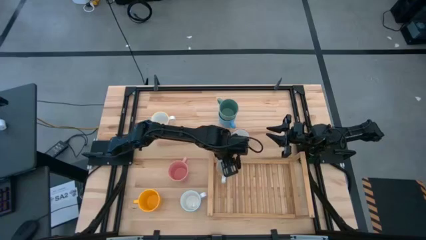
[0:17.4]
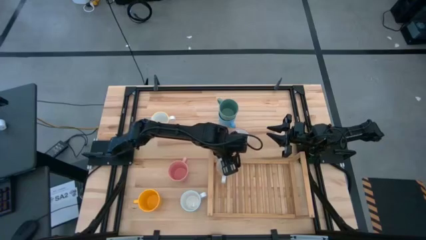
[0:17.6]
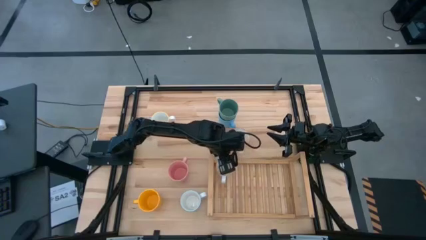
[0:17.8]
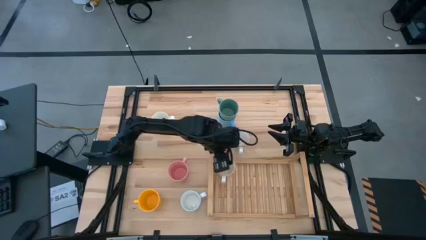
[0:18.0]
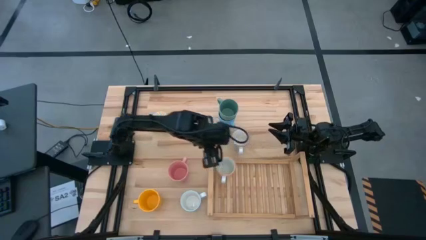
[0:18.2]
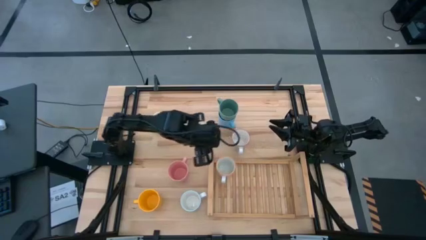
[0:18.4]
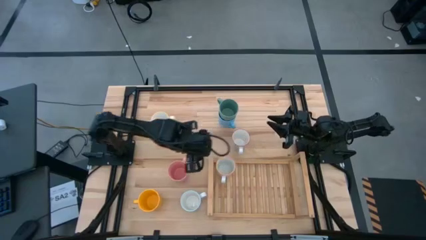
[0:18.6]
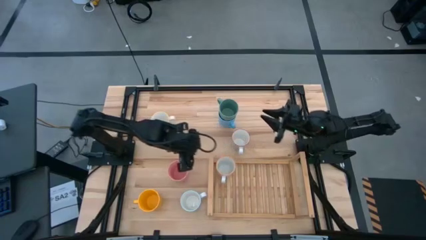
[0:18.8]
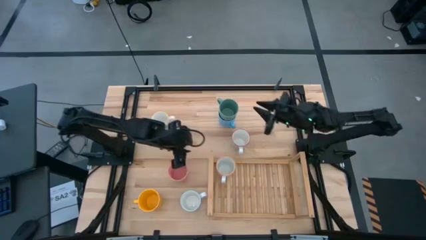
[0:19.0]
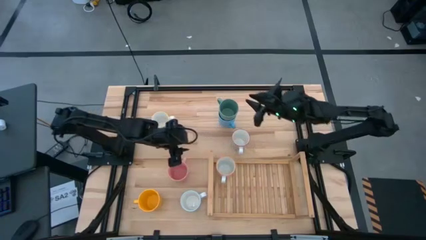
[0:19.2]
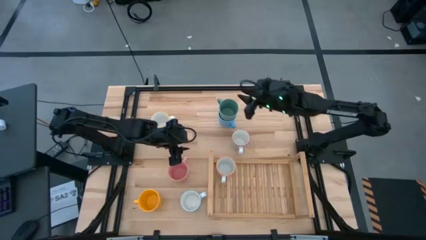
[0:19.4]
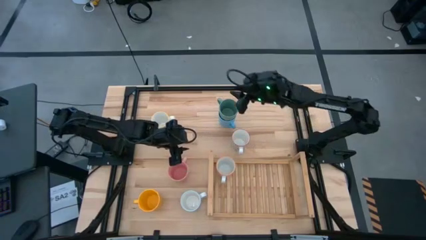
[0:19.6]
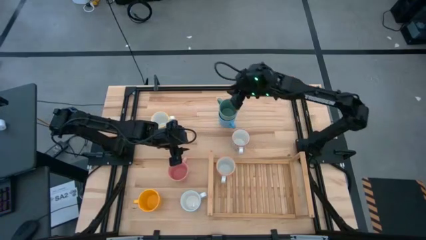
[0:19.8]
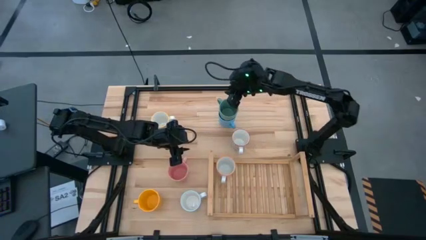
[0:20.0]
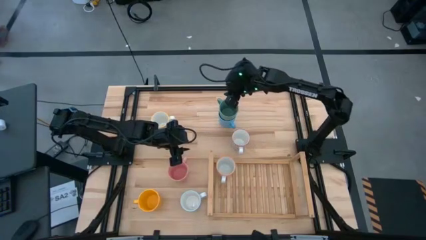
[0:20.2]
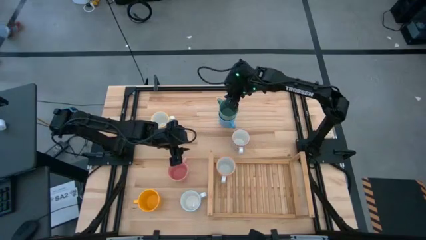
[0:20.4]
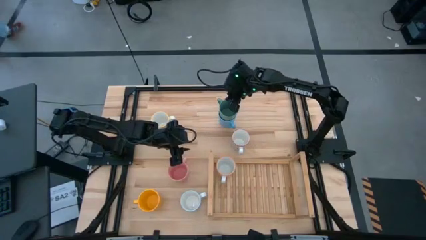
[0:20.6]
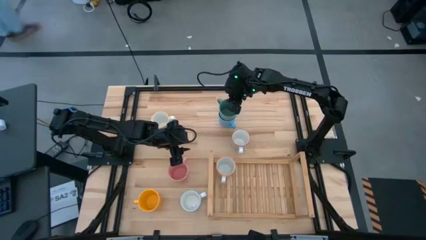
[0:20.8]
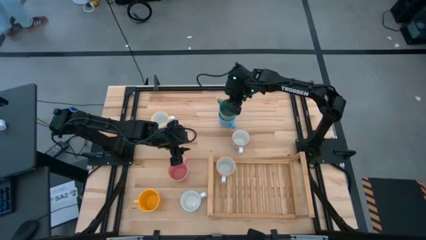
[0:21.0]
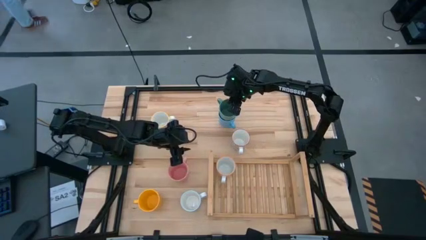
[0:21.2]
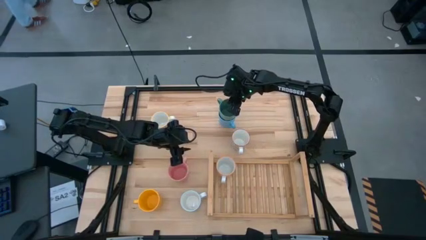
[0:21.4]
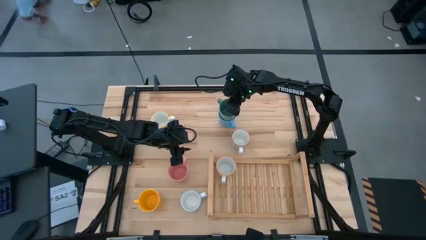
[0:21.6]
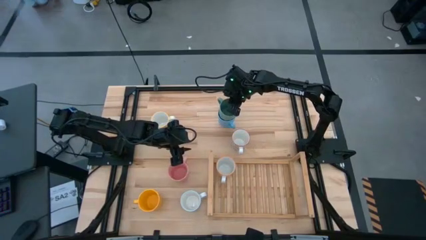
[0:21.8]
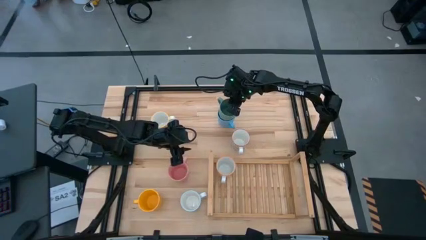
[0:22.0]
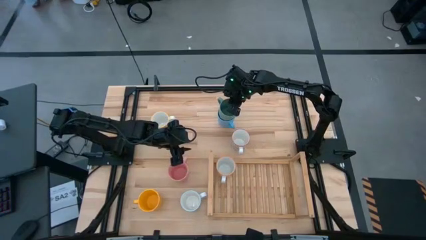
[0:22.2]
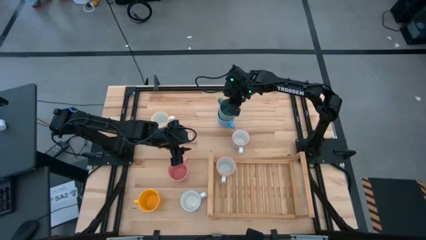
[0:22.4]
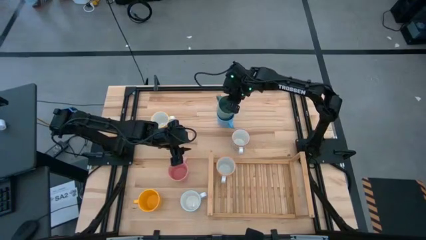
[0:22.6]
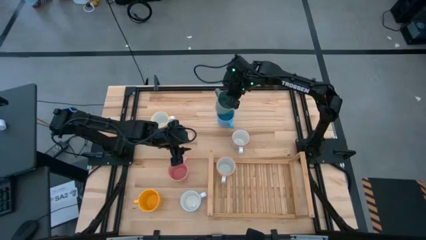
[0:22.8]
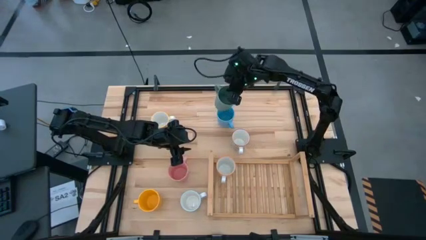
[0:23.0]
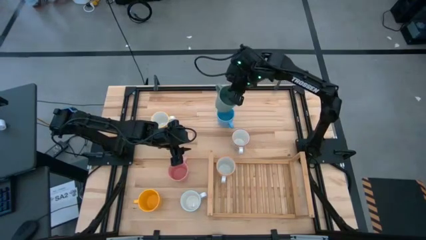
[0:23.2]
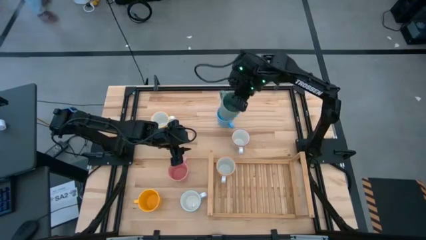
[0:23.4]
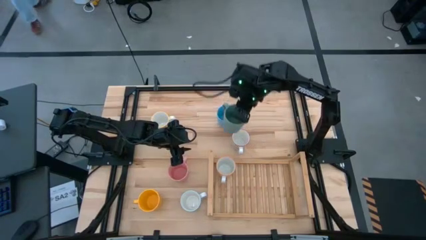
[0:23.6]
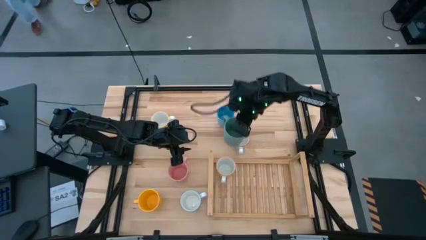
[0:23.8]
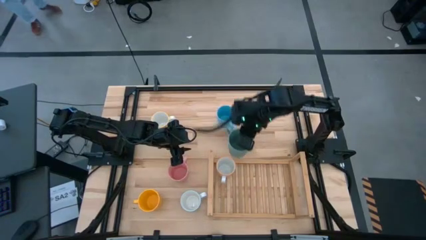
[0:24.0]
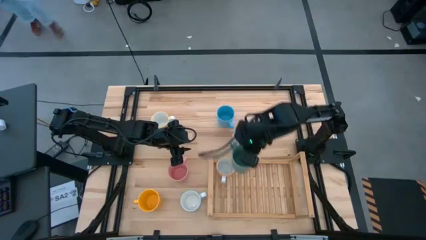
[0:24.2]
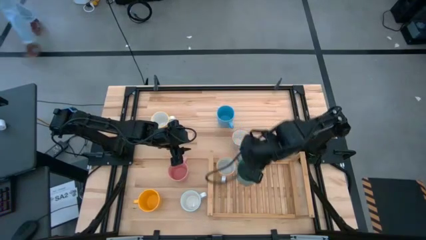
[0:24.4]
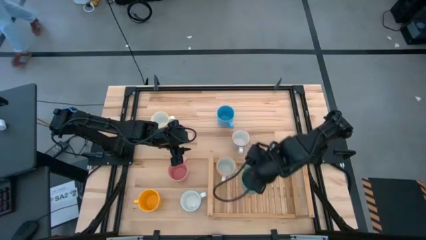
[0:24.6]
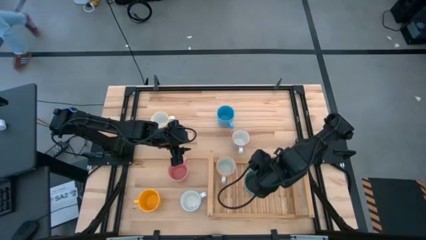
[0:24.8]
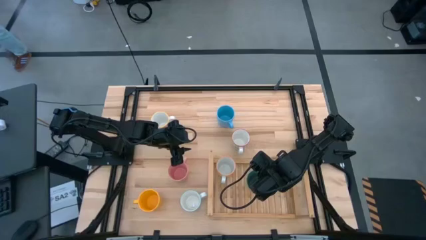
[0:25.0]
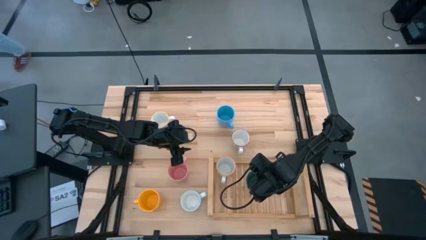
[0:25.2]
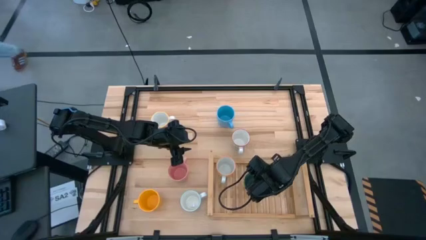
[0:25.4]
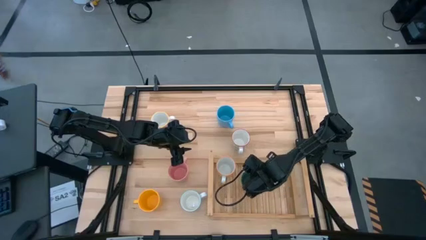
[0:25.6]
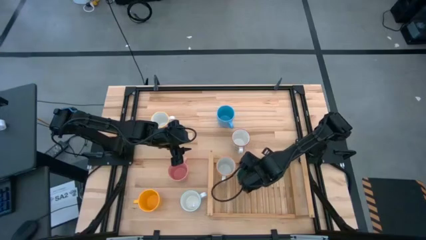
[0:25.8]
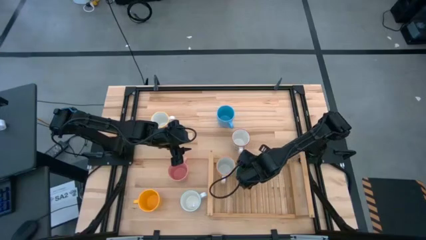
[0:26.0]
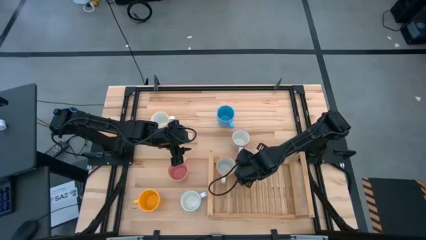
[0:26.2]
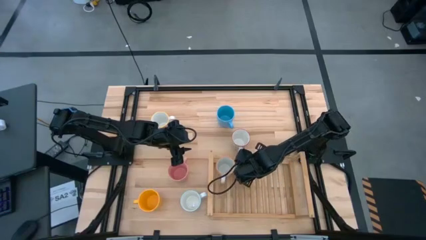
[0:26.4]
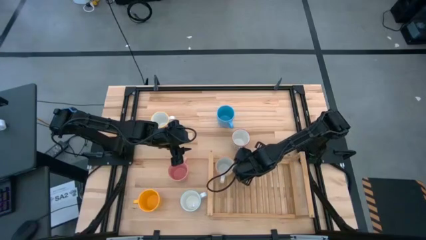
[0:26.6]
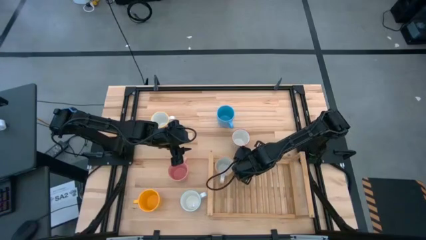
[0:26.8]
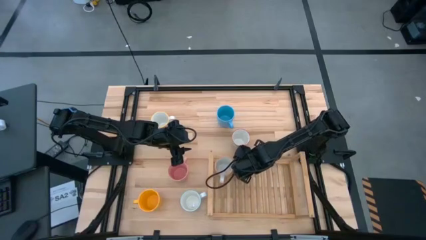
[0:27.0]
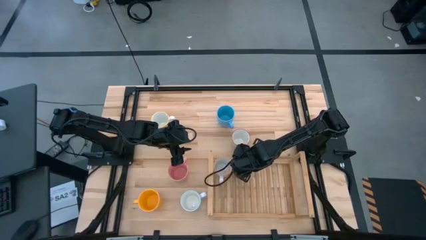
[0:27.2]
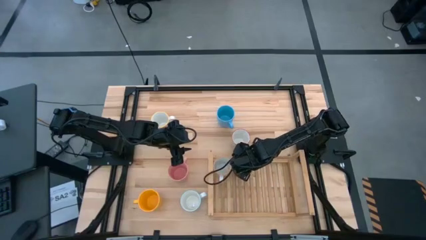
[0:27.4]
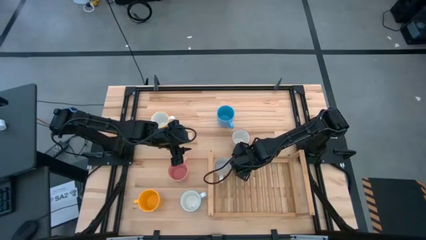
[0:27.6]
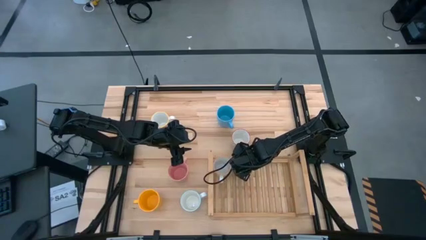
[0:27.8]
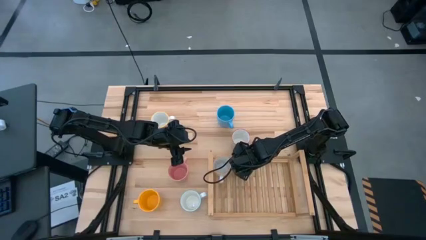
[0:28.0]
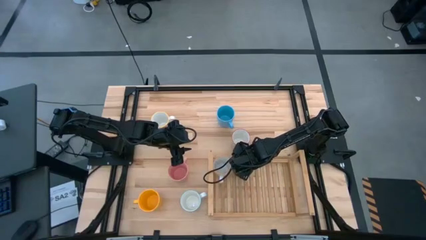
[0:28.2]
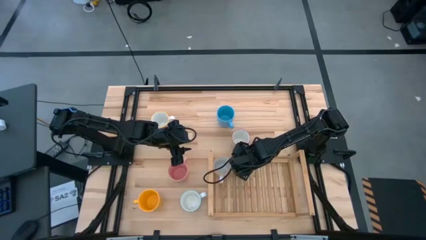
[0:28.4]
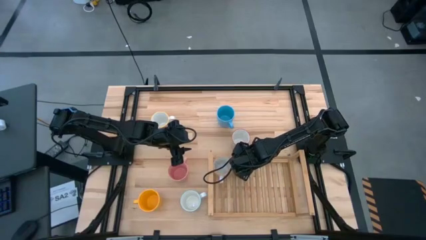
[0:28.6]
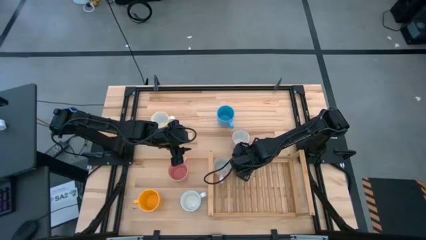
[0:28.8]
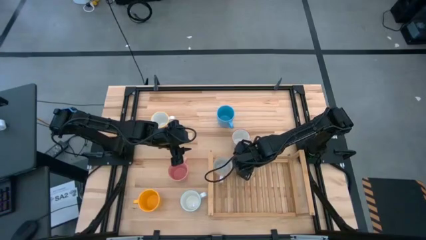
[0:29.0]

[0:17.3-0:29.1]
Task: Place coffee mugs
Put the green mug on the shelf

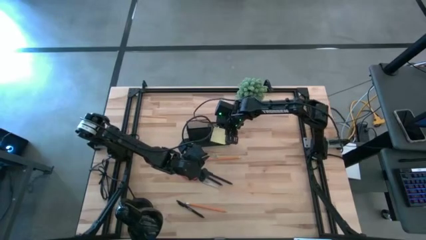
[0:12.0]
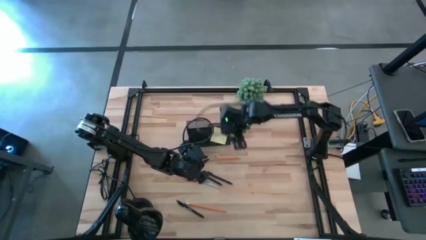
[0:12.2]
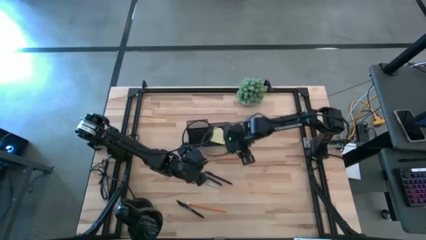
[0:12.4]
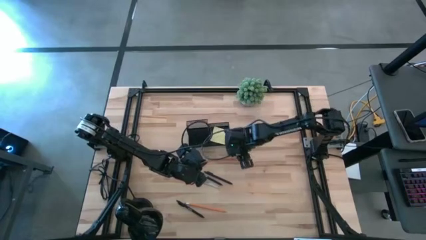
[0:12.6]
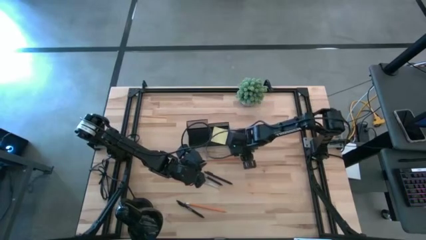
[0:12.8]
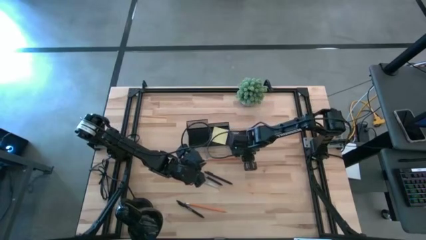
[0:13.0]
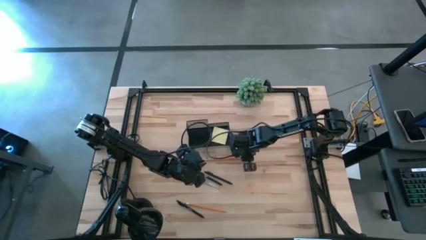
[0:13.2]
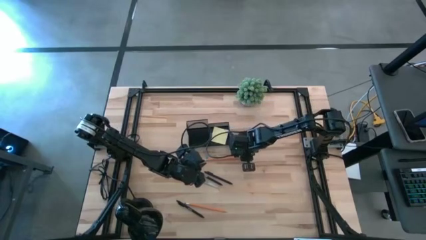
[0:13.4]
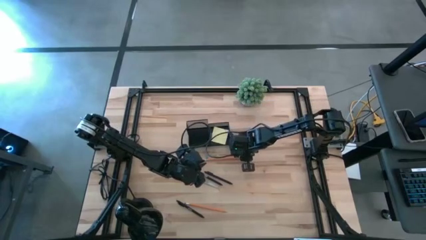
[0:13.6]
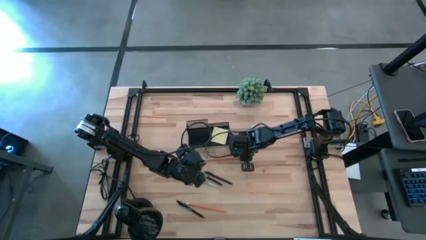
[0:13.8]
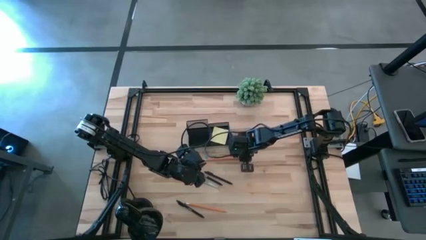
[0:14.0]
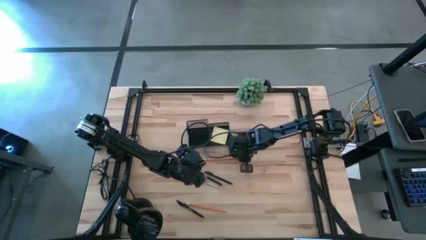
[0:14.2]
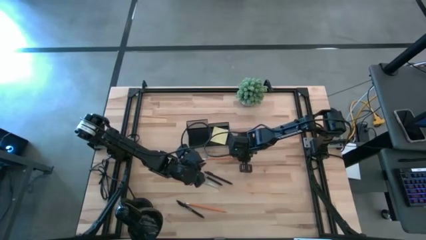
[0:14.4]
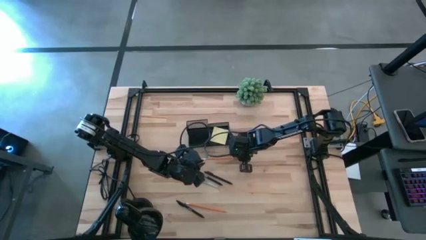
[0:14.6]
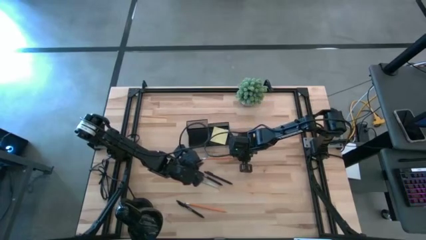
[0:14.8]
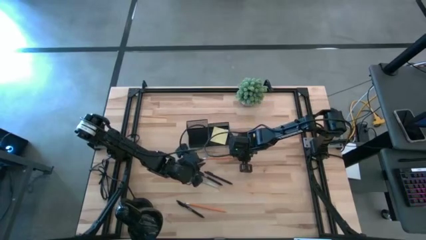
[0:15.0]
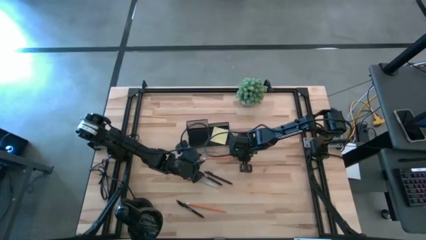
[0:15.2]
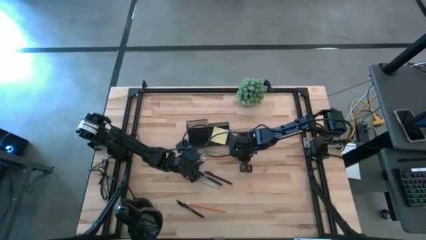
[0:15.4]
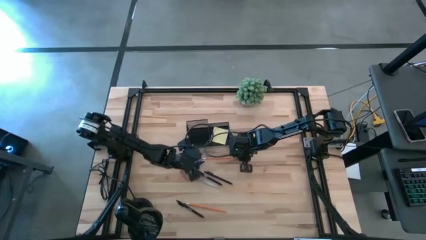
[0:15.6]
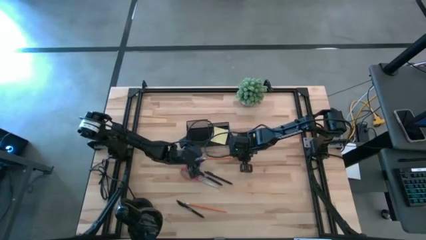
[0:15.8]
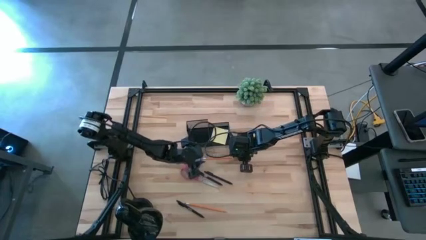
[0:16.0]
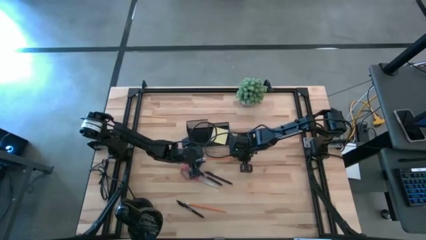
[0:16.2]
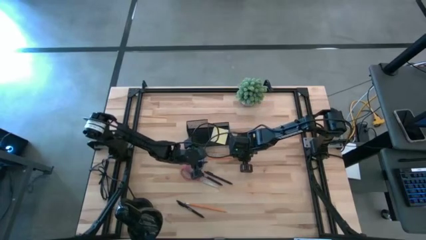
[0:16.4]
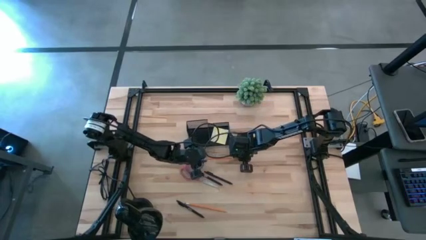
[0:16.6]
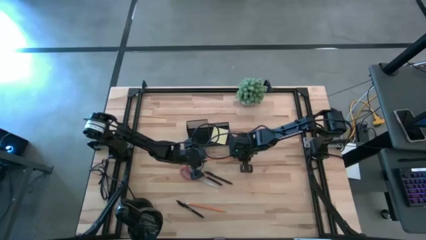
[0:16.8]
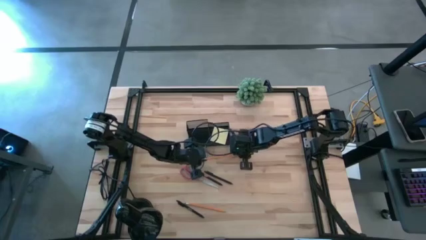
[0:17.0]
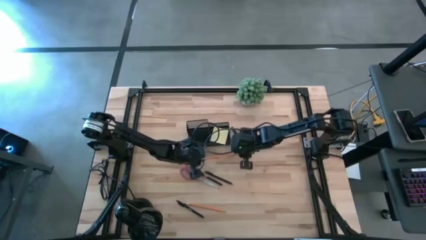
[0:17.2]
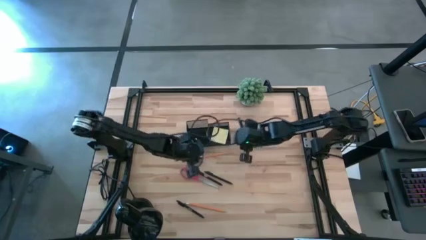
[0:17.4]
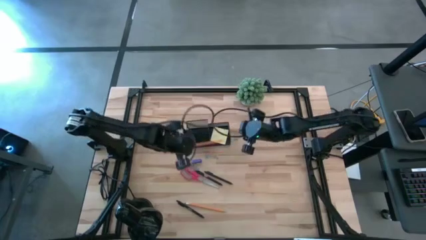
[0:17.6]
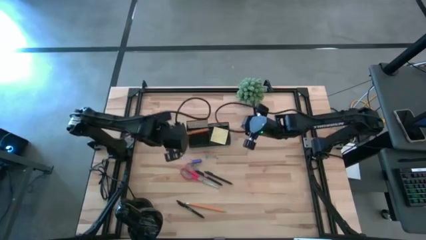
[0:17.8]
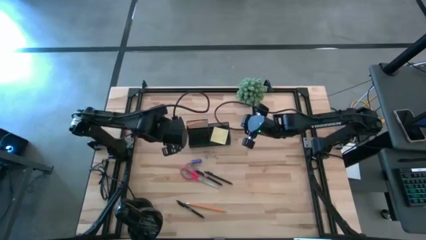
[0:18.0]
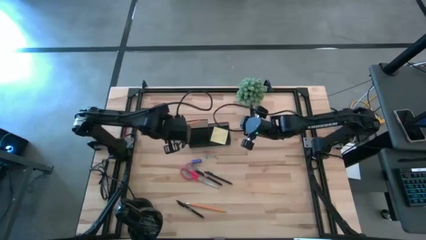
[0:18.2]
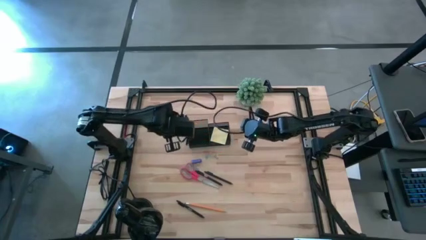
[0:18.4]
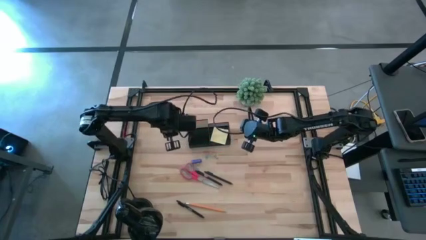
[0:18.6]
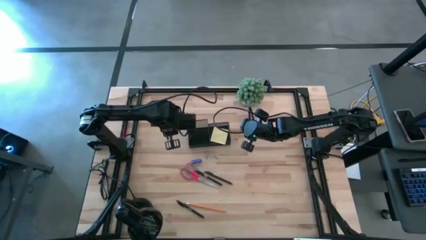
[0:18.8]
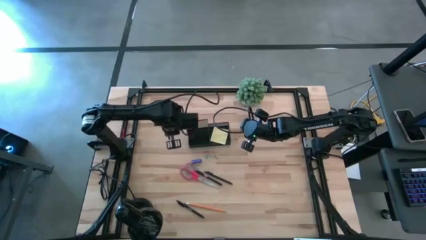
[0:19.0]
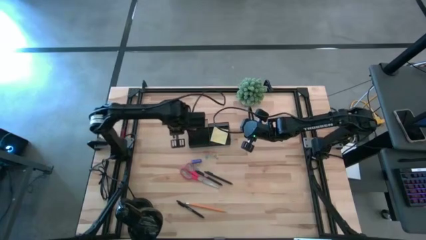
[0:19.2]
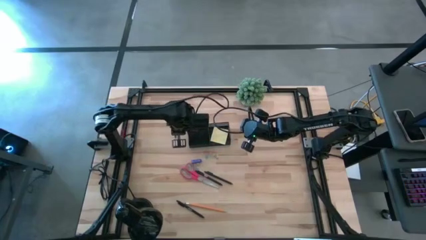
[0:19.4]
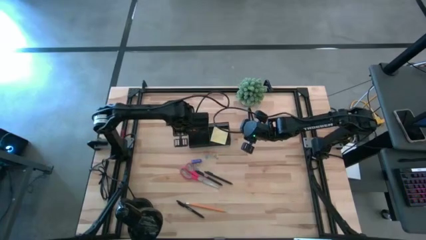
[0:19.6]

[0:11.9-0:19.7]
Task: Pick and place office supplies into organizer
Put the top orange pencil into the desk organizer
